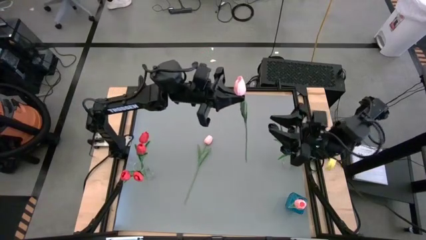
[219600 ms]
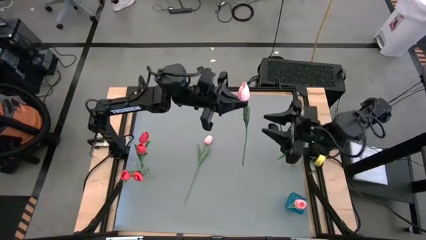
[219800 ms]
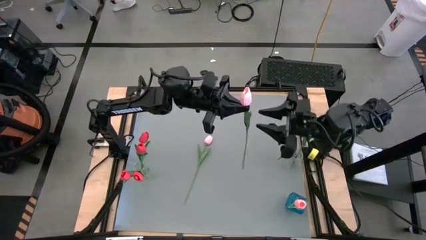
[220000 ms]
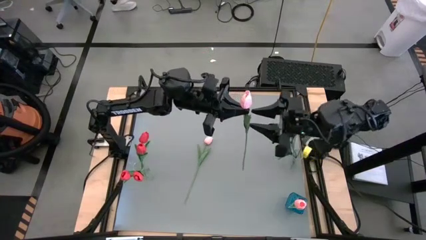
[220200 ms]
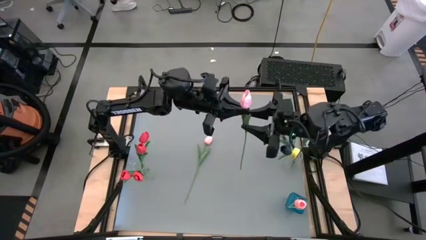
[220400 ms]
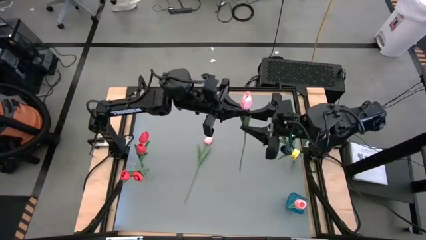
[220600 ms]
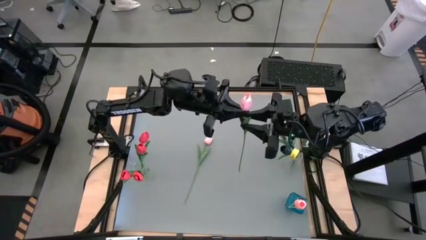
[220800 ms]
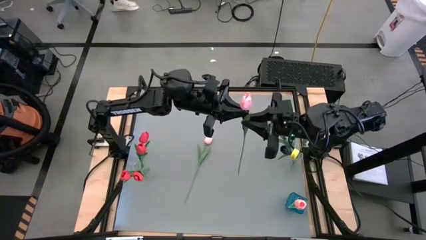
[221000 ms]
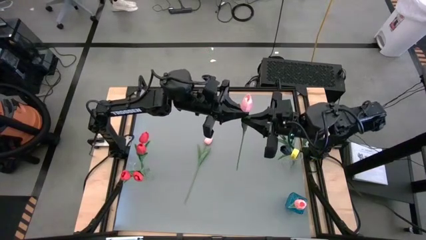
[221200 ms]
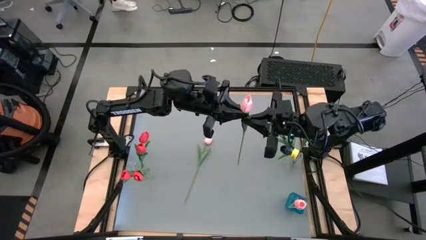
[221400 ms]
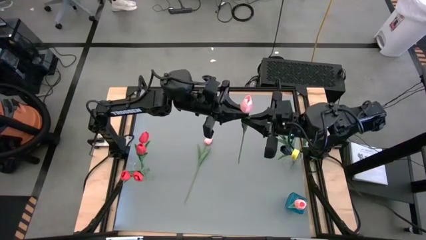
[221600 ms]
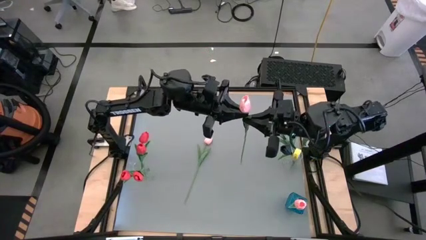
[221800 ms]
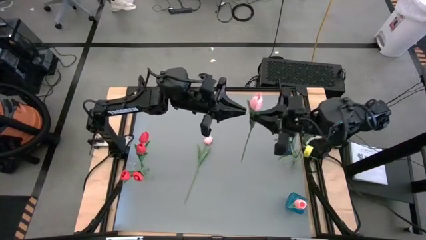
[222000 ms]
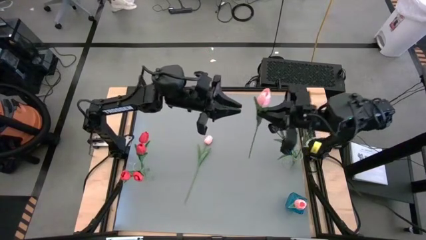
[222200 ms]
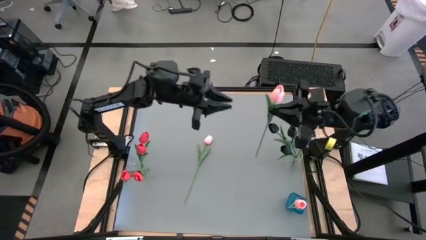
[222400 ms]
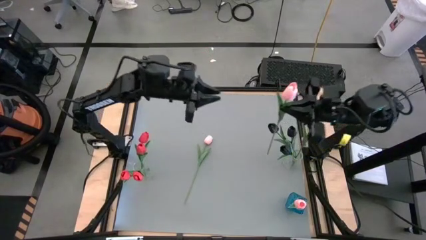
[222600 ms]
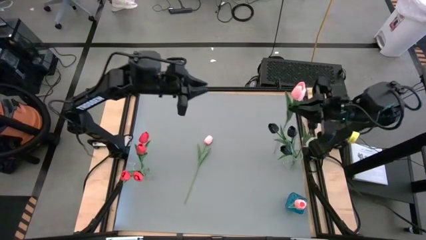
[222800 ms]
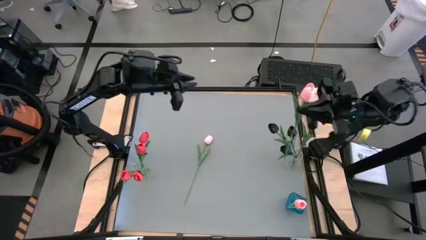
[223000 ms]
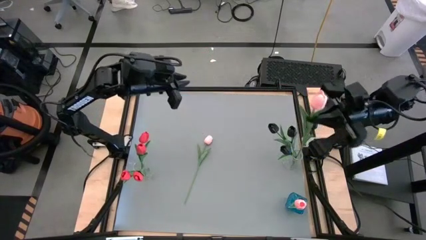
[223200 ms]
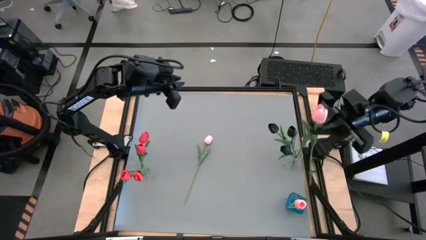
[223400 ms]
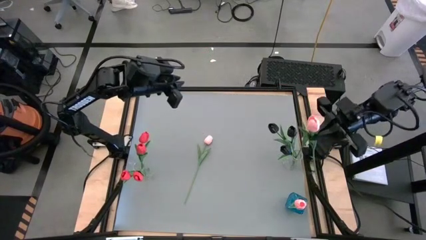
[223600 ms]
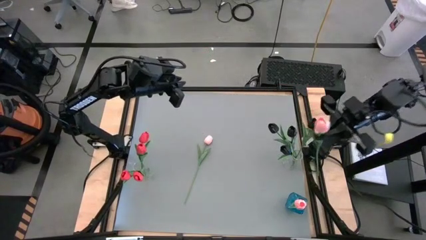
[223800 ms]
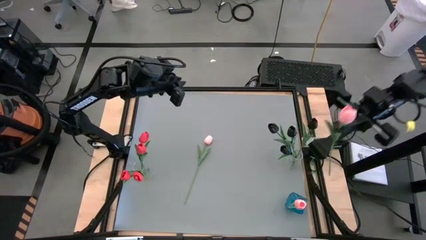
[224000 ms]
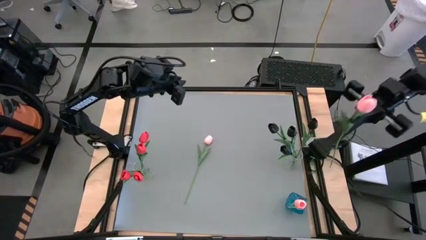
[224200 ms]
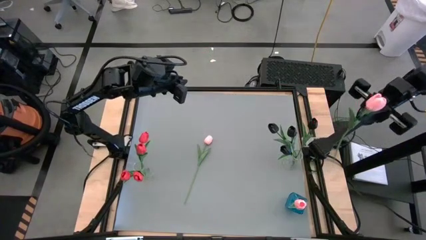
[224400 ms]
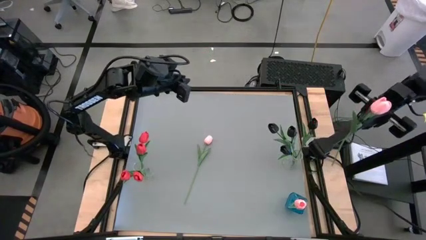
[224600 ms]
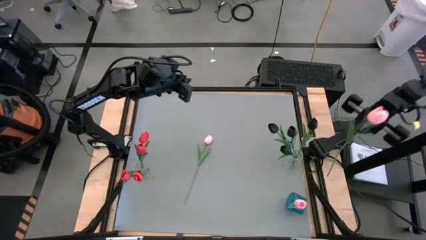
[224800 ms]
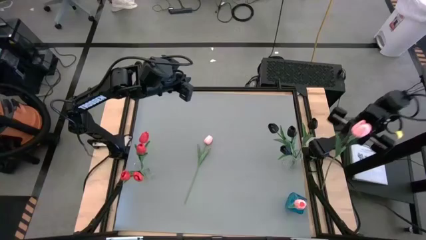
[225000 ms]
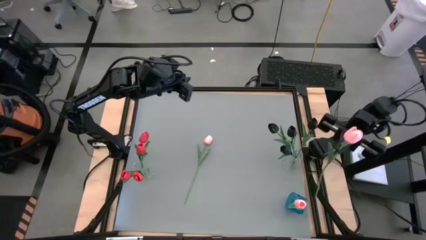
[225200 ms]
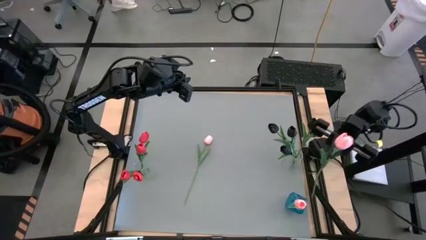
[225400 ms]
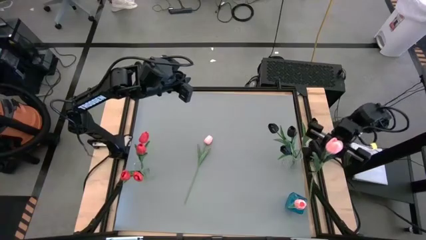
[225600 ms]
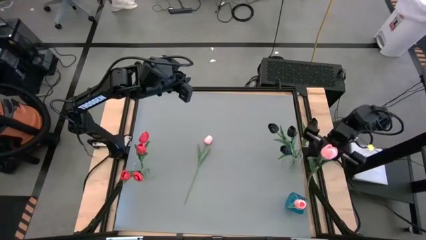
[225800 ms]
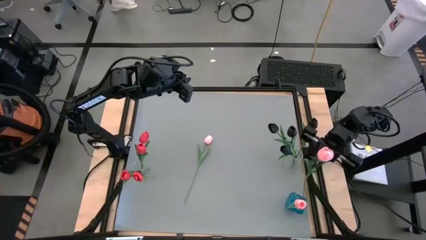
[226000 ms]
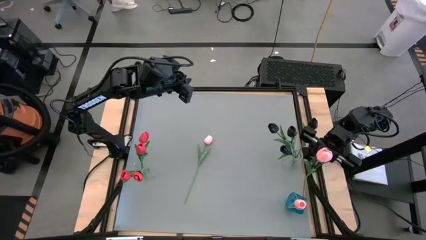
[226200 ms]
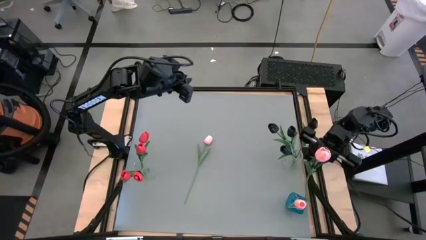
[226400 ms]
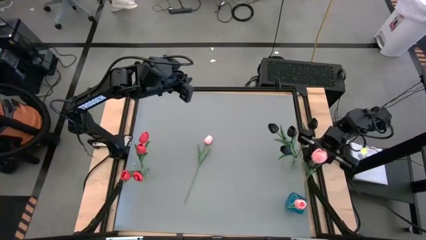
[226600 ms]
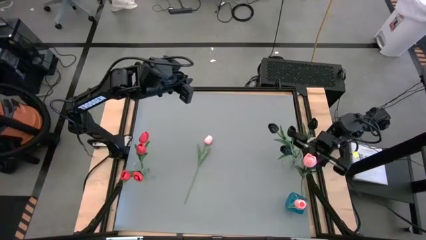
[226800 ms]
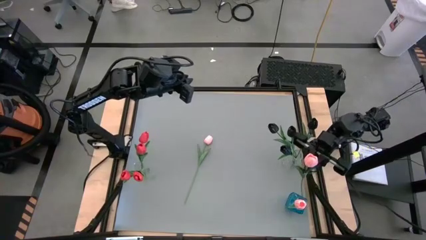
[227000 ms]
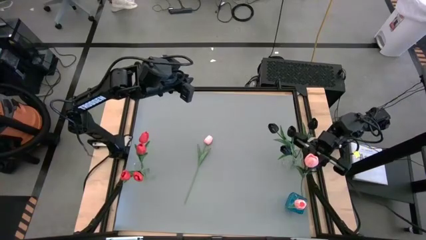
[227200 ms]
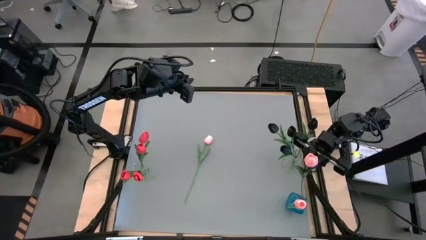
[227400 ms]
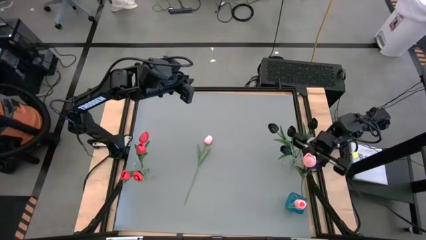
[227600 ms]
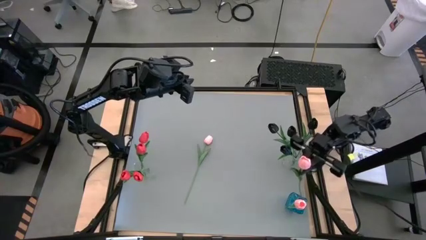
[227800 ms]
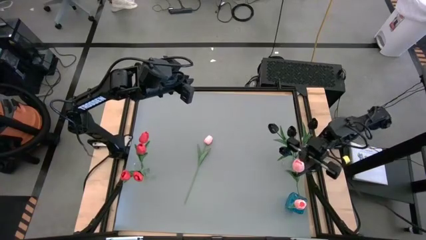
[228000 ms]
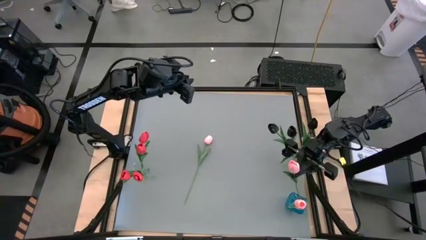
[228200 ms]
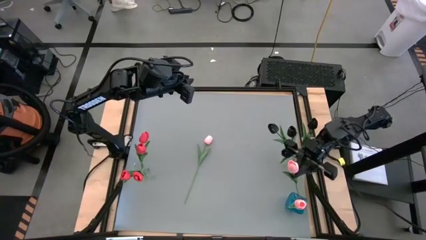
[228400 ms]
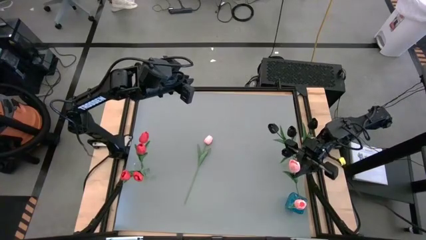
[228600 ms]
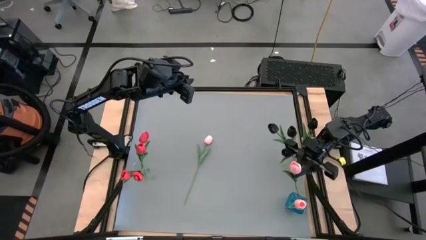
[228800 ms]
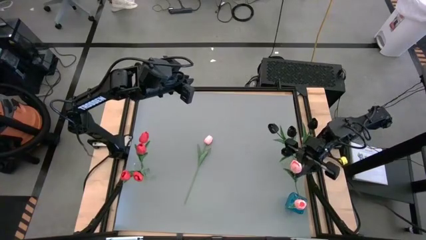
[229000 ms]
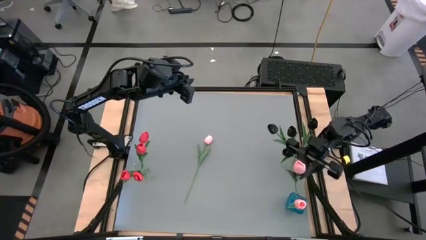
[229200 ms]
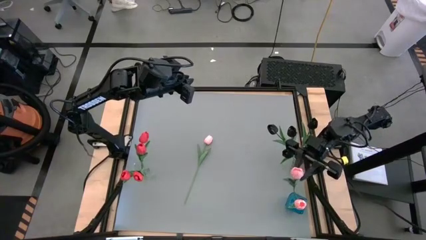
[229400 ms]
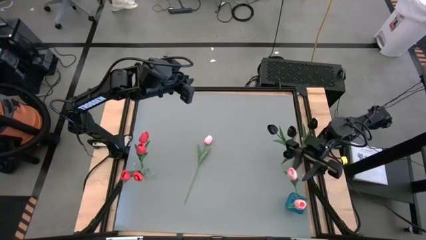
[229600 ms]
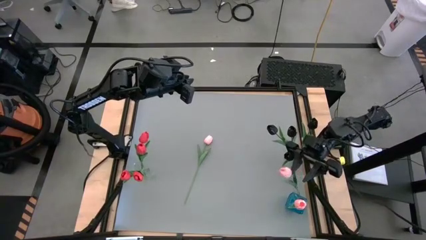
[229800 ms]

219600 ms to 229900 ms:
Task: Sort flowers into vase by color
Put the top pink tulip into the blue vase

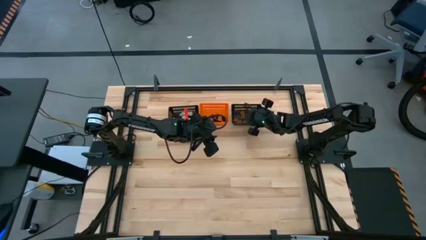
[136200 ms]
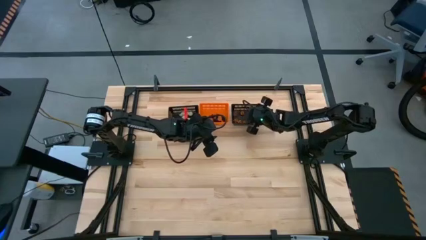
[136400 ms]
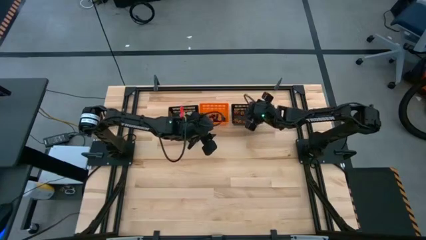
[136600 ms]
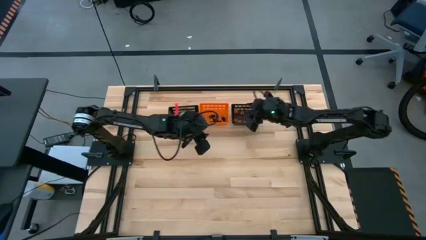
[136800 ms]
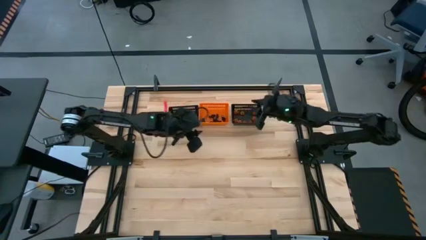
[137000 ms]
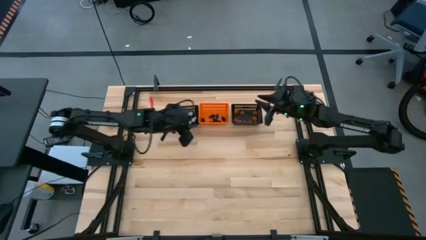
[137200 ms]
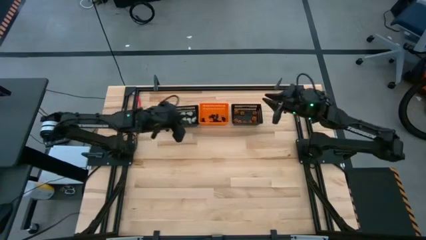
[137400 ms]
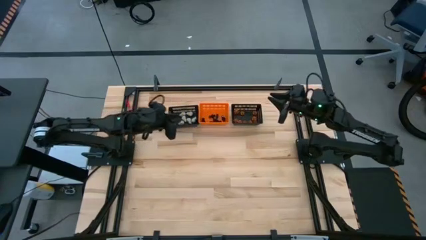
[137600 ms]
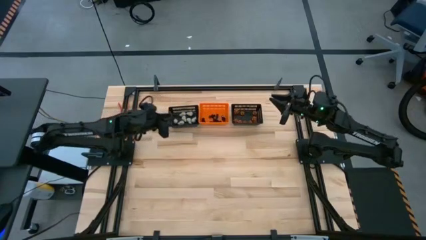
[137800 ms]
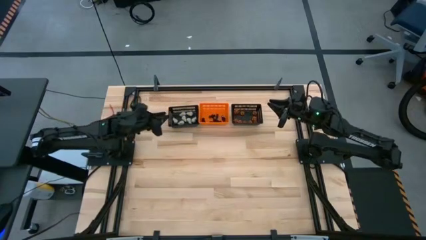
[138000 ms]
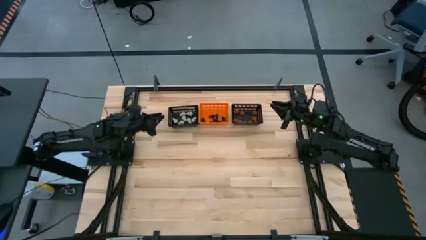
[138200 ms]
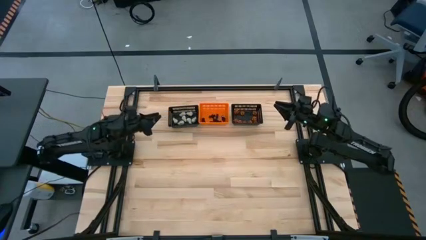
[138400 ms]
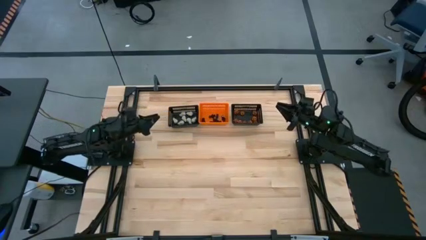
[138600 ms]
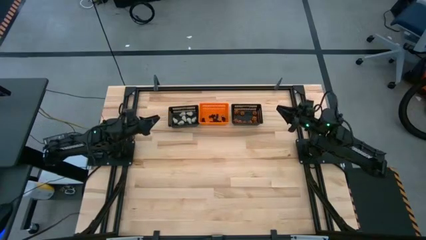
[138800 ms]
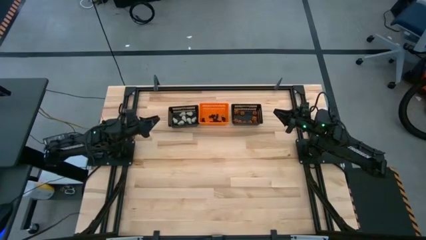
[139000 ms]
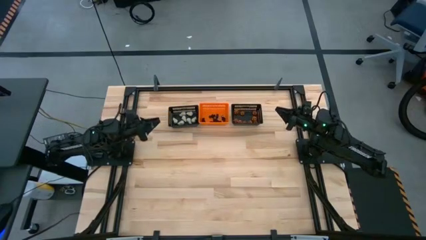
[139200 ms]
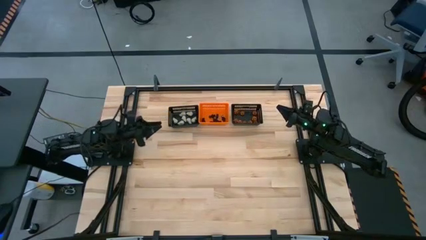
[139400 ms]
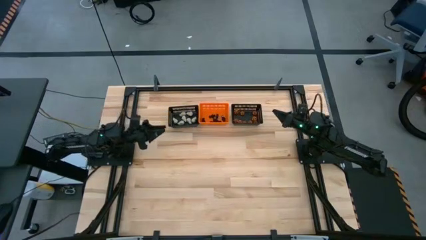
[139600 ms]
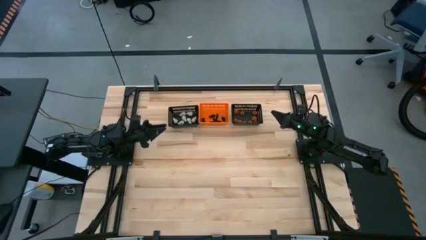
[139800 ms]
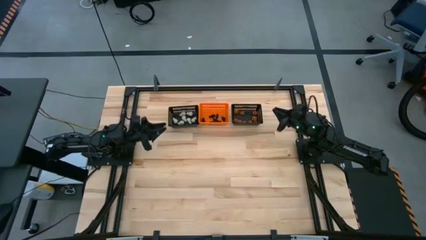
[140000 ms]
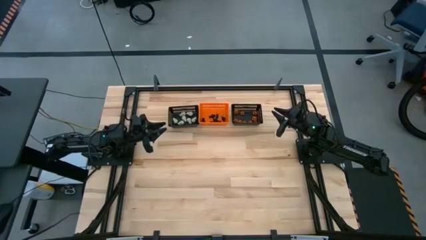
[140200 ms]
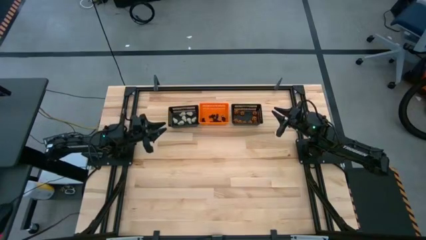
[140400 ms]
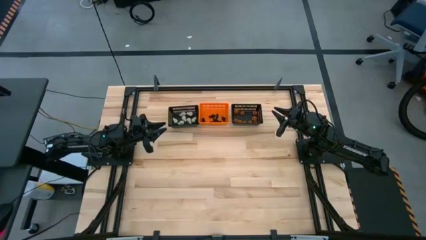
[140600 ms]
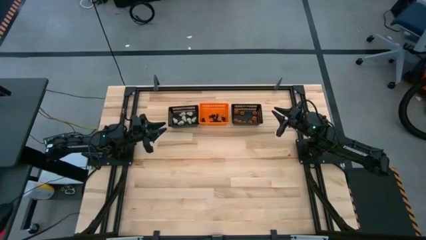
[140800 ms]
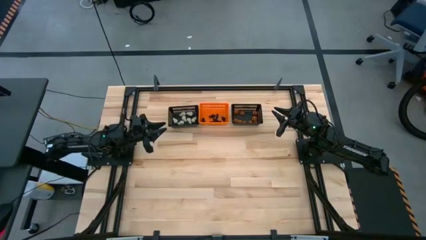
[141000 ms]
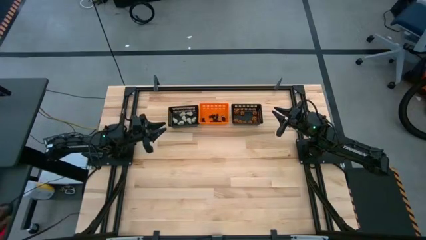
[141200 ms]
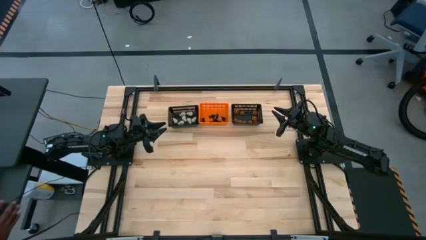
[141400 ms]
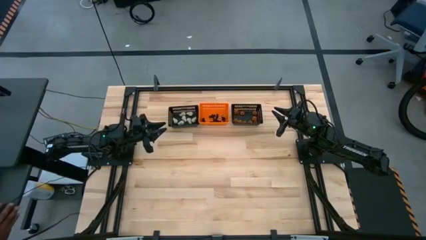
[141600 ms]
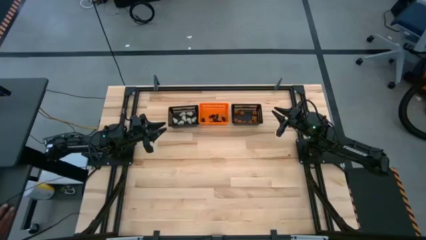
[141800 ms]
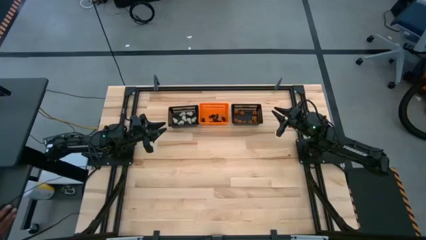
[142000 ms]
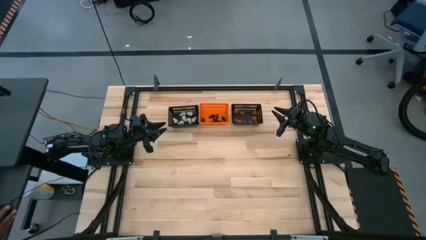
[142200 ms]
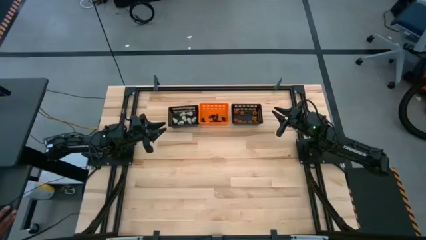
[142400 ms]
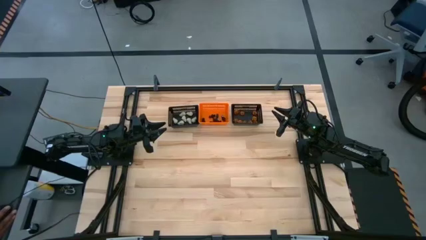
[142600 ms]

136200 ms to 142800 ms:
Task: Sort Halloween decoration
Return to Home Position
